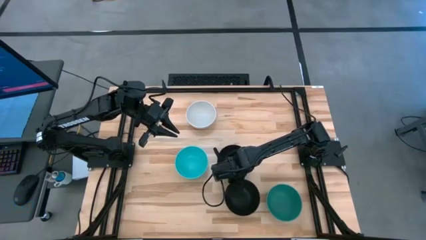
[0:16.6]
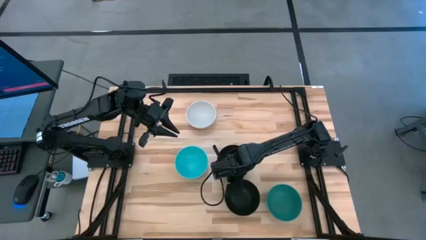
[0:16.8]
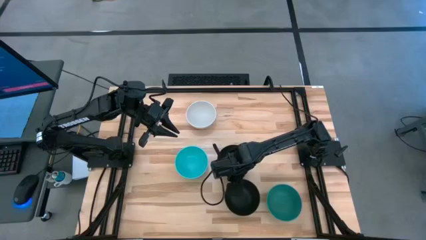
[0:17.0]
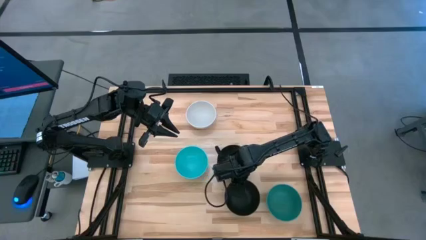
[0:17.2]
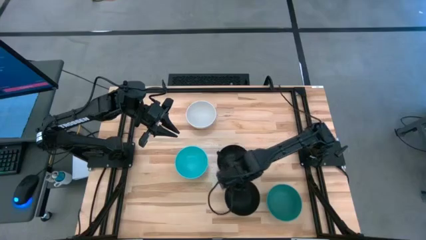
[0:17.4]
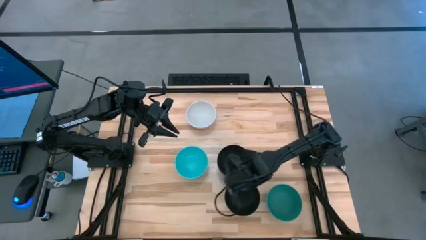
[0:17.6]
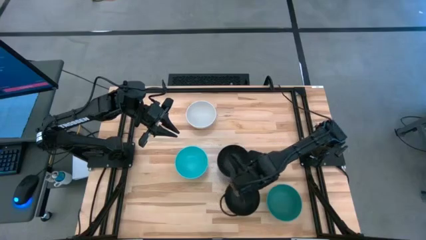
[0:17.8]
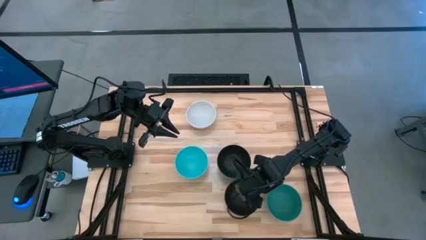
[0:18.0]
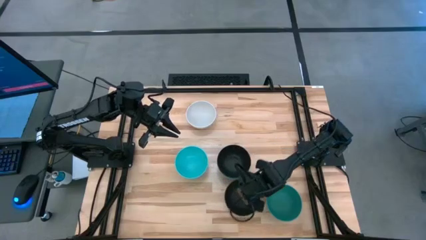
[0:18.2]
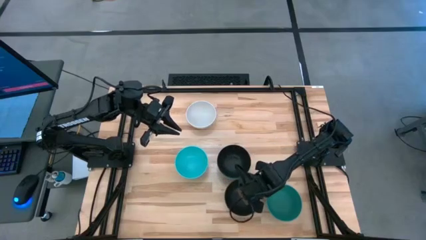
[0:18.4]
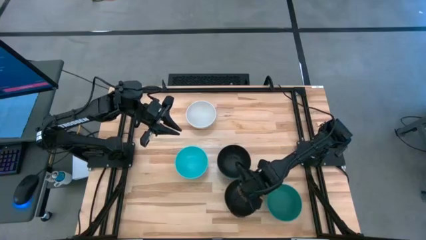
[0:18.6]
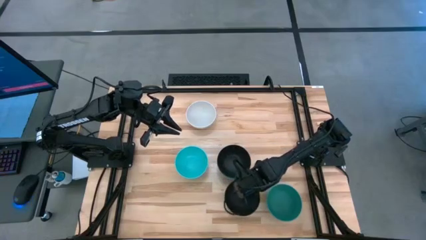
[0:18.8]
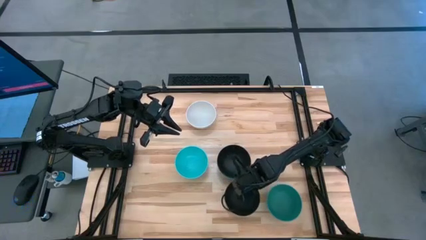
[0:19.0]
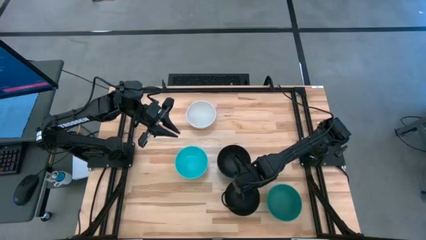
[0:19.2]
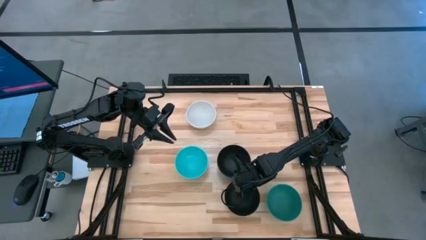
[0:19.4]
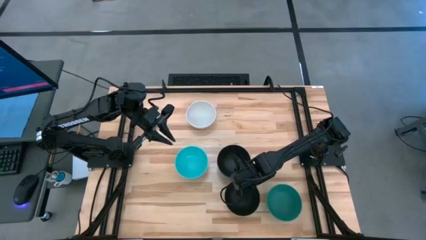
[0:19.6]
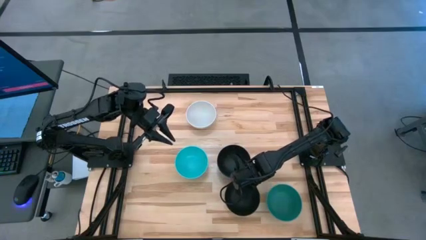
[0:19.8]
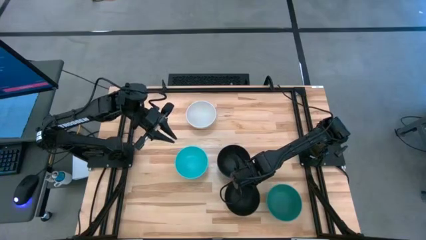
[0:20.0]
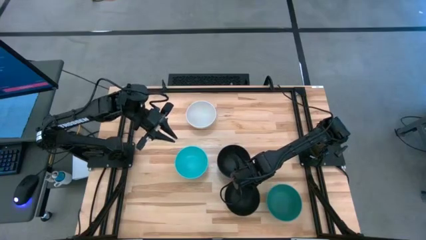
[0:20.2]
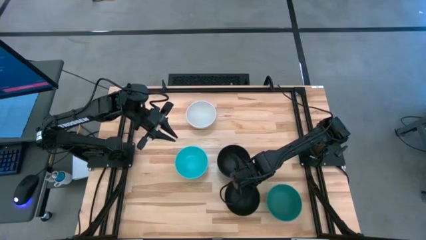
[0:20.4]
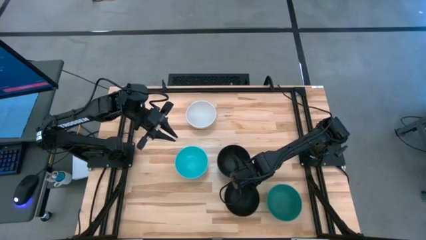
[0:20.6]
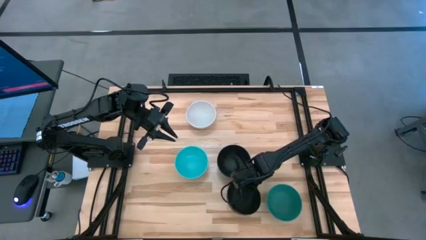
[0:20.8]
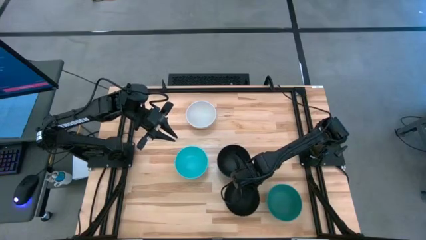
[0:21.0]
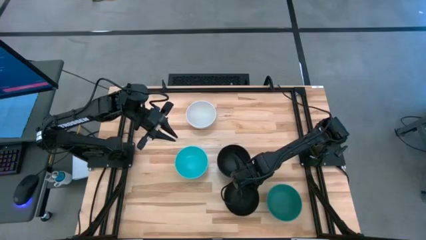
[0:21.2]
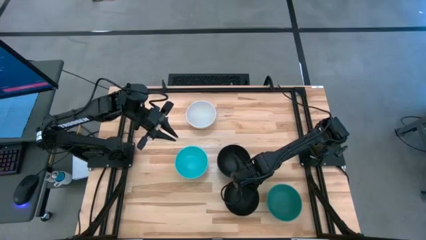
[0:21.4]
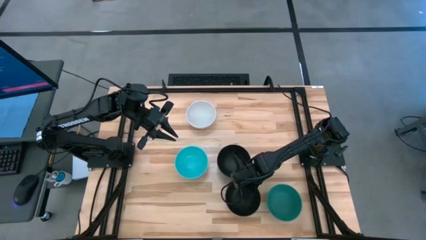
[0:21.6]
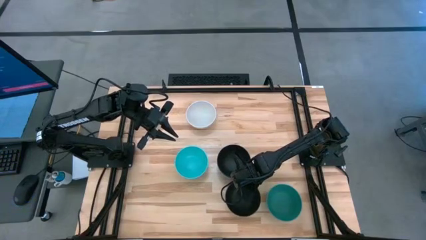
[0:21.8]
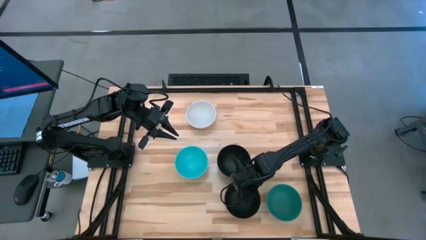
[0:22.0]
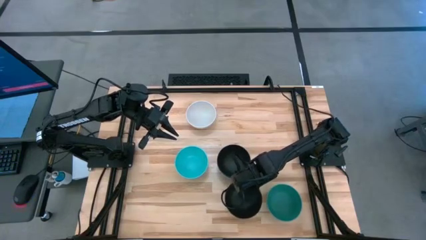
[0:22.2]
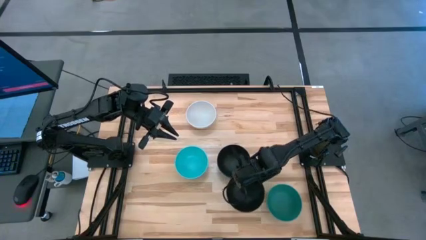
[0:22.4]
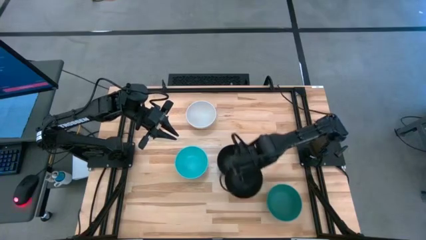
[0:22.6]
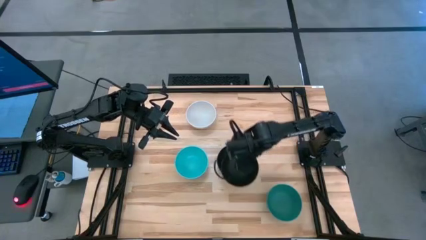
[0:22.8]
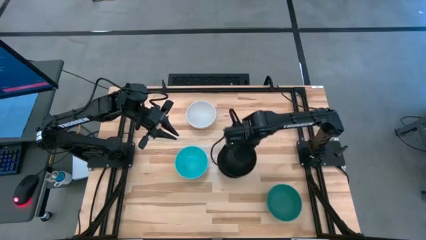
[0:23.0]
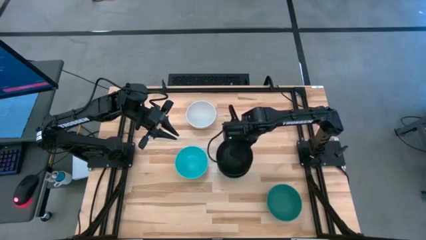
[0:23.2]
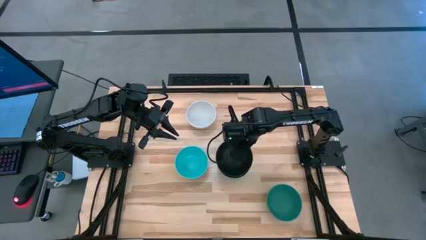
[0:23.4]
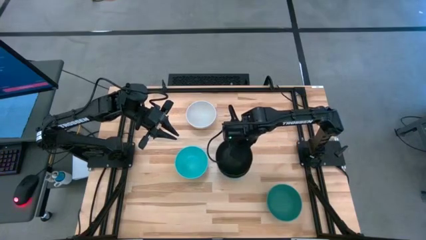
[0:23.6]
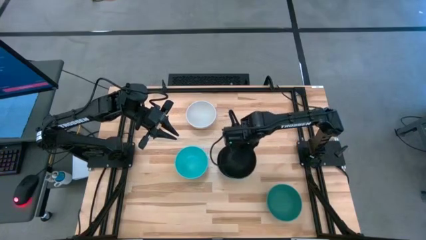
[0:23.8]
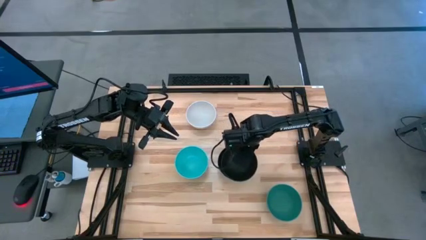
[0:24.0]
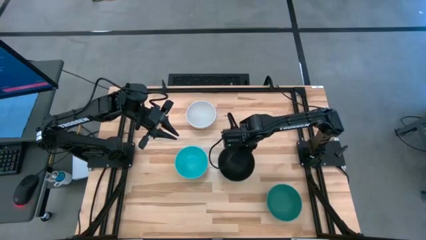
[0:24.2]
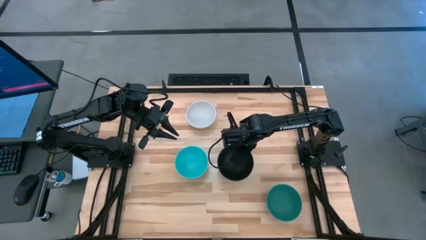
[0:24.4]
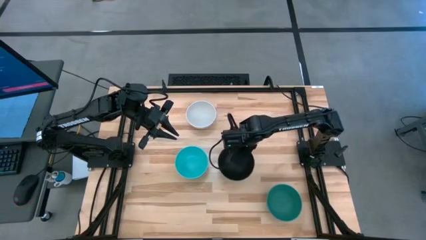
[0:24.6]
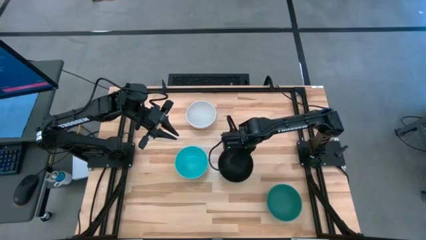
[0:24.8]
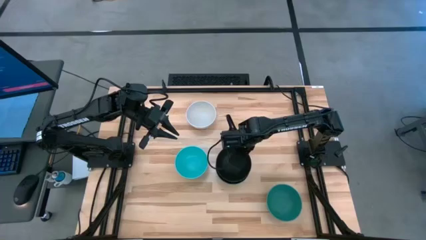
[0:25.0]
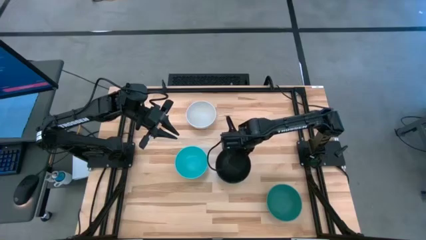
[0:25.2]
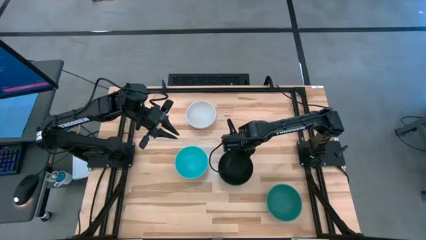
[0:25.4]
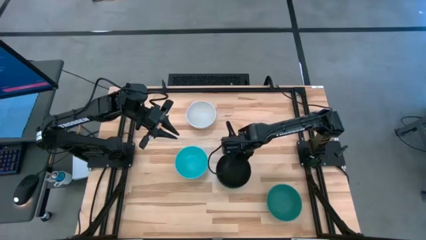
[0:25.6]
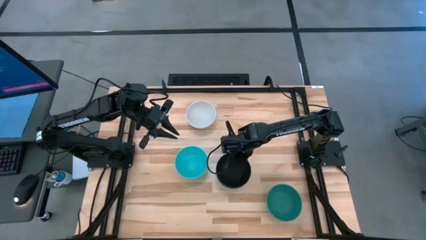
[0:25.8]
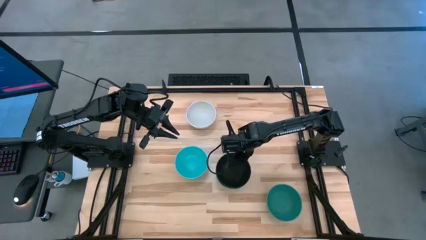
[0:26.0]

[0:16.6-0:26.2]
Task: Nest bowls inside each other
Stack the bottom black bowl on top of the black bowl

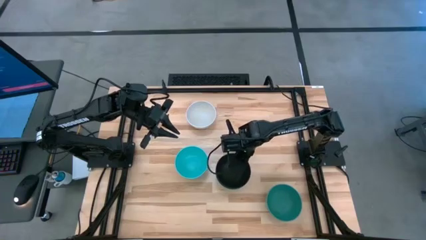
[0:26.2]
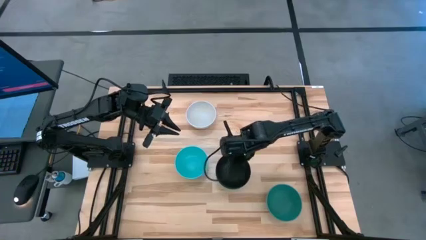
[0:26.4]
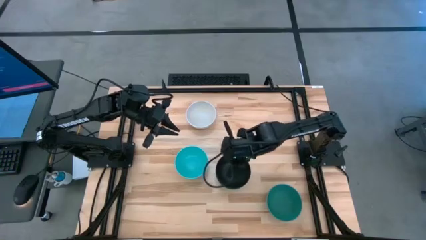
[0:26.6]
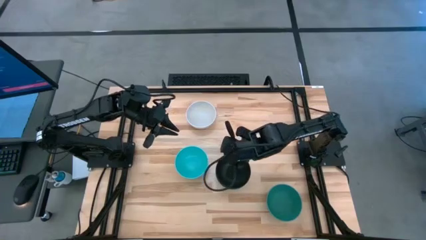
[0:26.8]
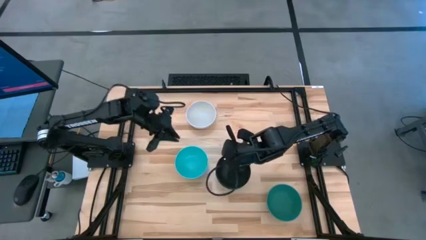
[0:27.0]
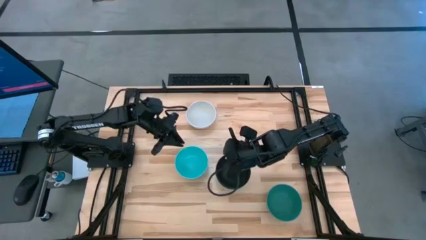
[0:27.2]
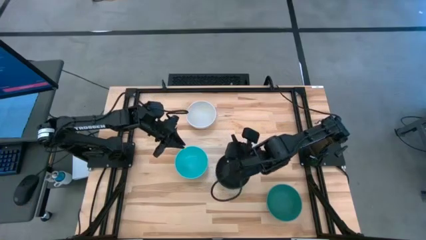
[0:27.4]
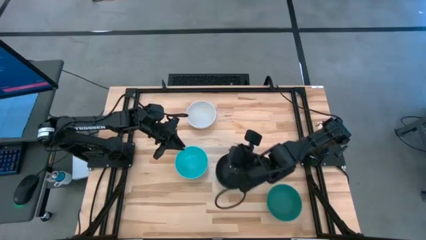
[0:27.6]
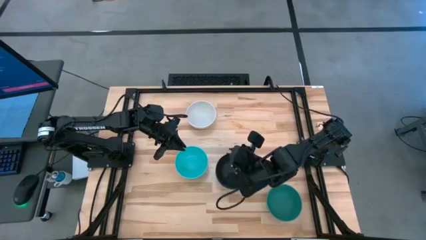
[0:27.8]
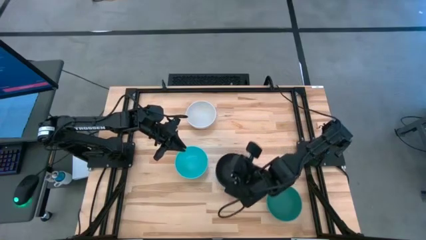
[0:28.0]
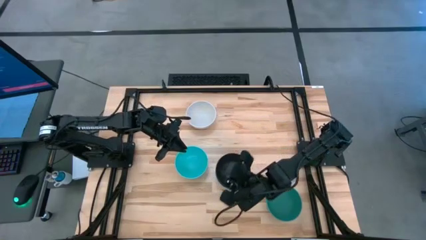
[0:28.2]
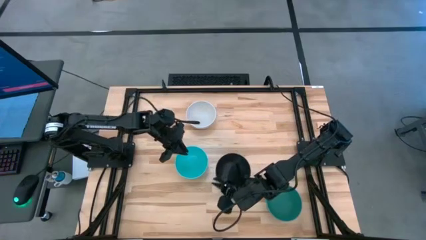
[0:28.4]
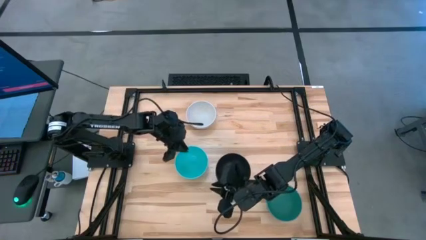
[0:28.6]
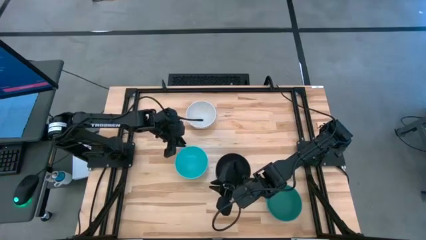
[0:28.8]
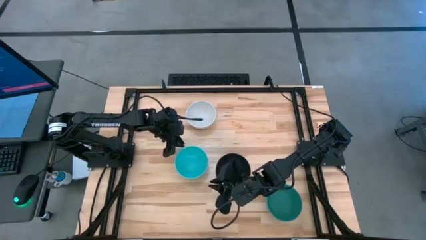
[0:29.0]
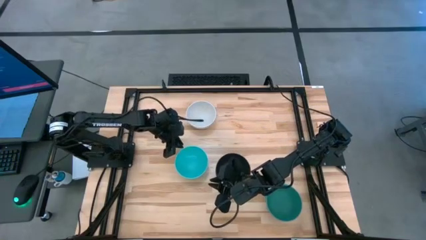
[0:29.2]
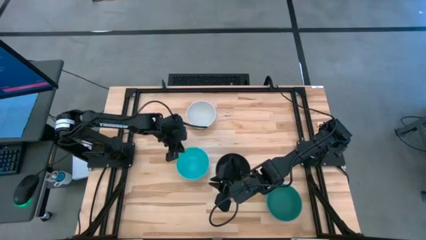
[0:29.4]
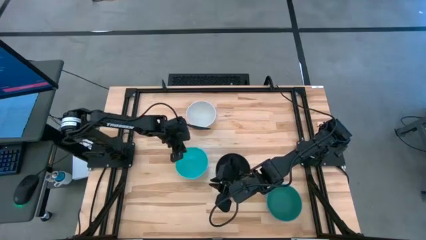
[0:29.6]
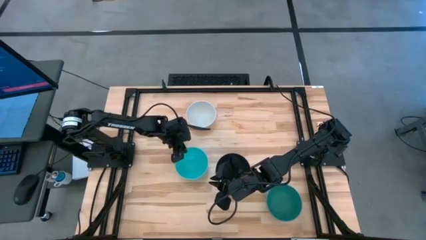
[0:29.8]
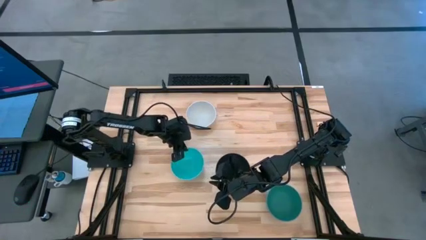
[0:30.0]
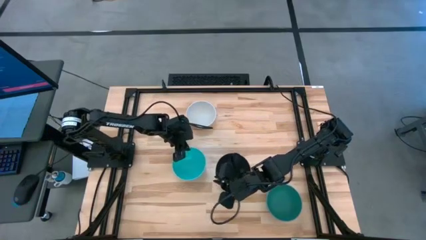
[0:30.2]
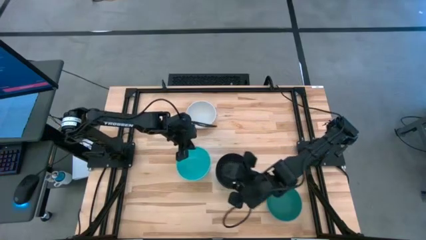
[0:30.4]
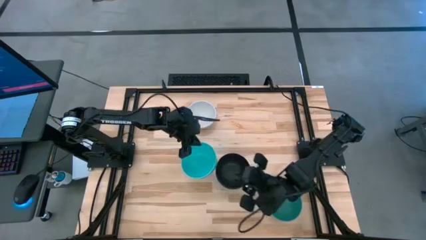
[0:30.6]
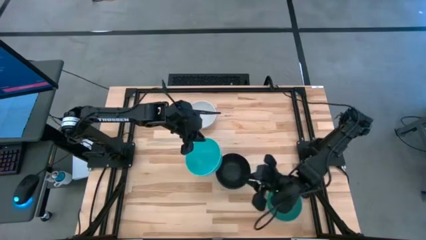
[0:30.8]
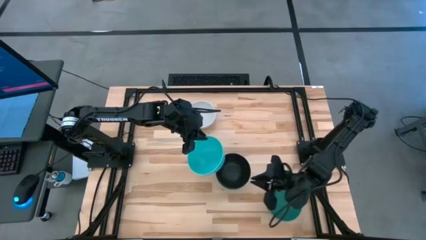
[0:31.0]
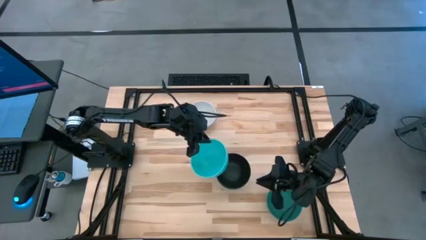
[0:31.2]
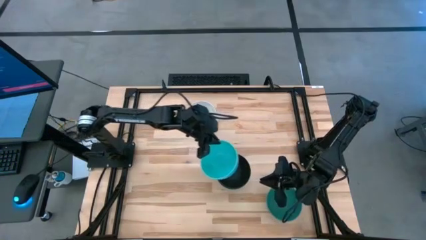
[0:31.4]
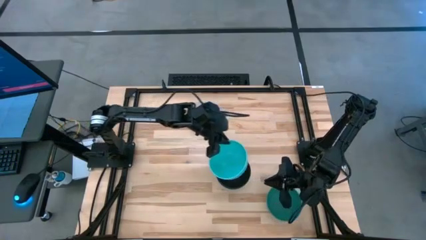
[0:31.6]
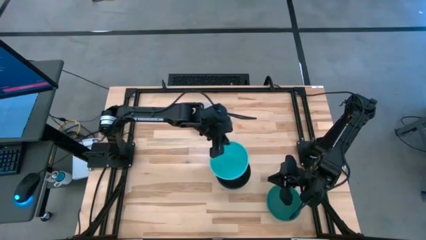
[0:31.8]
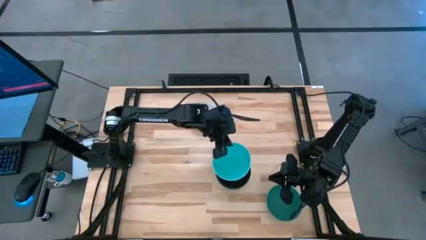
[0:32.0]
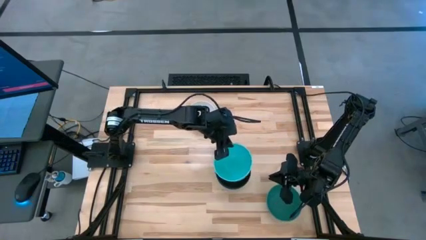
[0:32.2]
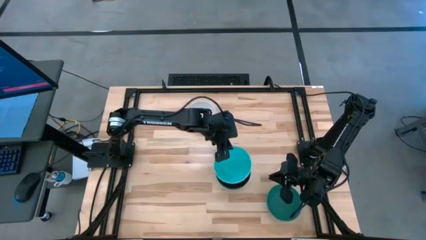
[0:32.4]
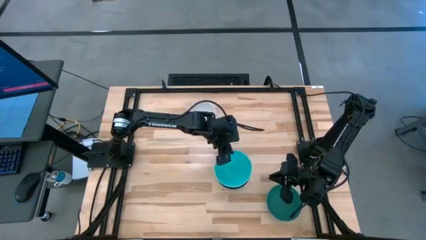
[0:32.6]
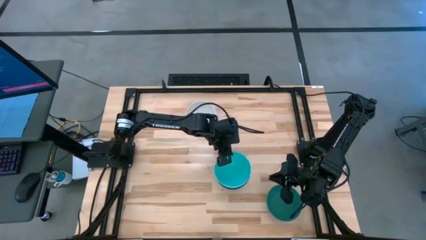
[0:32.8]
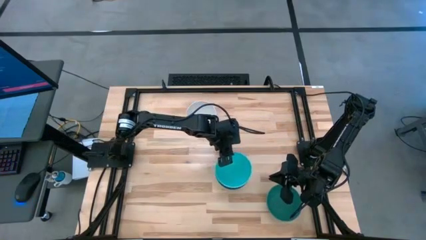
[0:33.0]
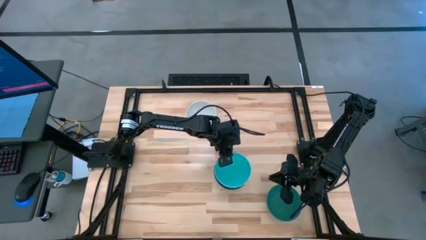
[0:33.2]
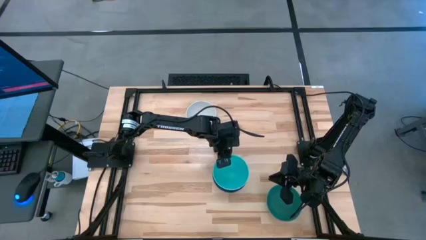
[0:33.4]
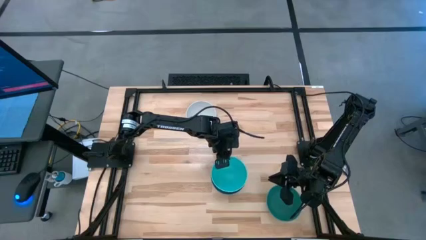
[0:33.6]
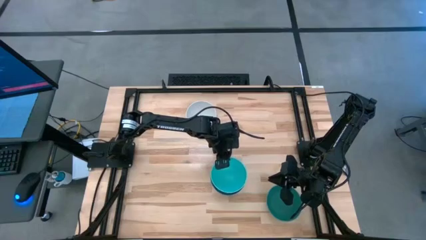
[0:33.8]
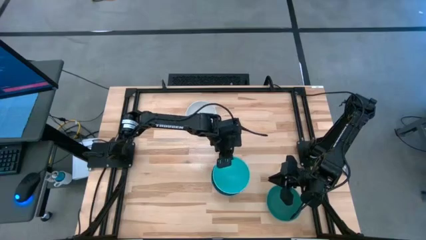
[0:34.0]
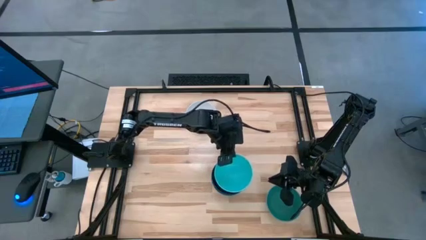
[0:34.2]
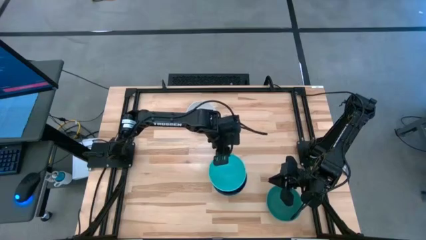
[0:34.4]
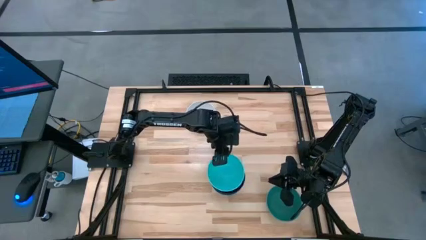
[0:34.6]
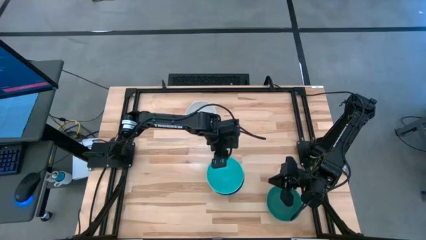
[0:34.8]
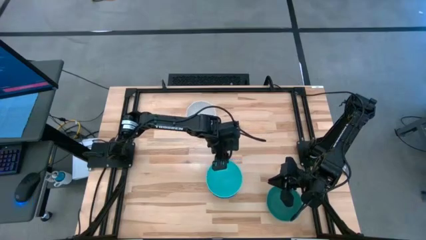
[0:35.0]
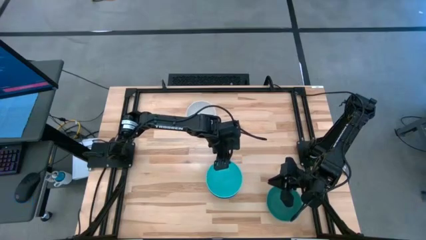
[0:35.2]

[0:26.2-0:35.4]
Stack the light blue bowl on top of the black bowl
